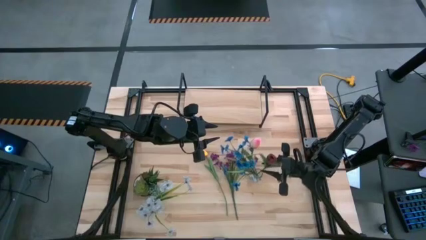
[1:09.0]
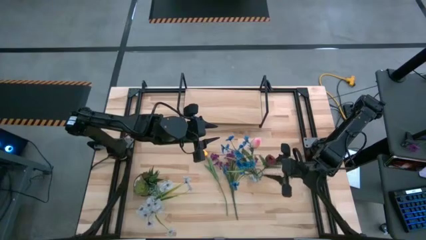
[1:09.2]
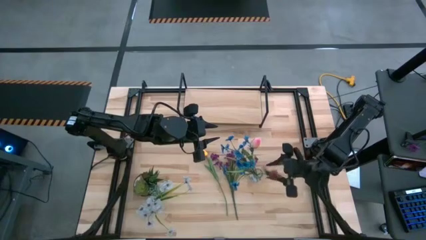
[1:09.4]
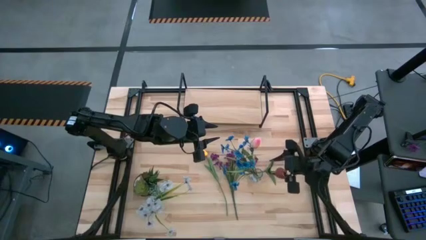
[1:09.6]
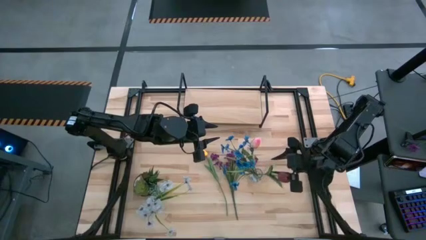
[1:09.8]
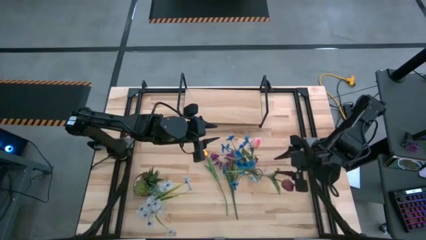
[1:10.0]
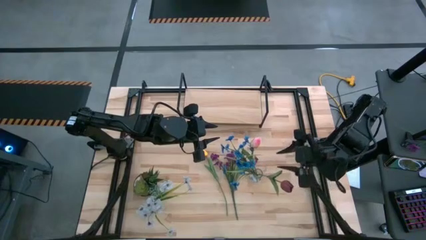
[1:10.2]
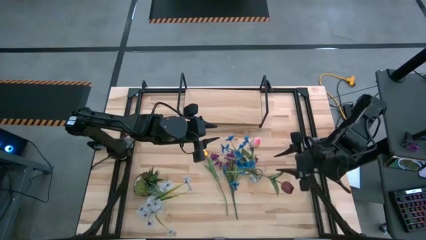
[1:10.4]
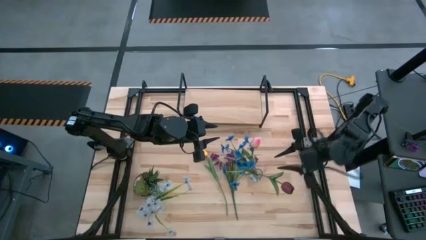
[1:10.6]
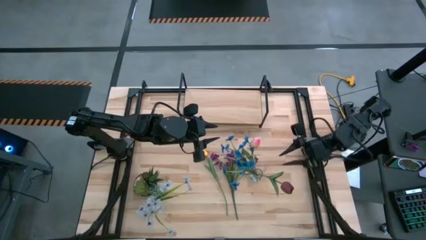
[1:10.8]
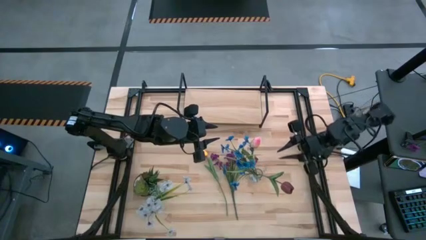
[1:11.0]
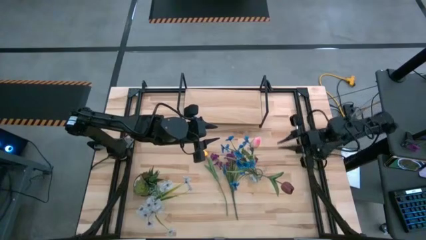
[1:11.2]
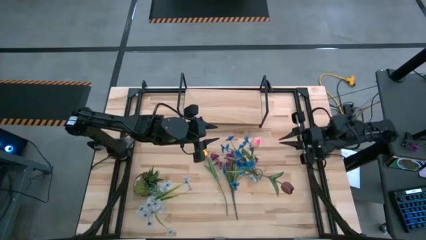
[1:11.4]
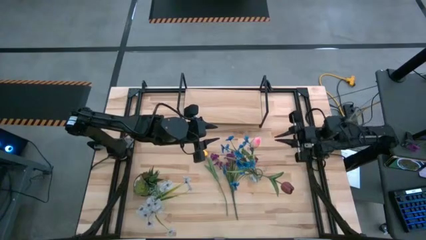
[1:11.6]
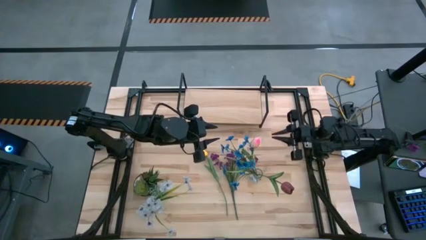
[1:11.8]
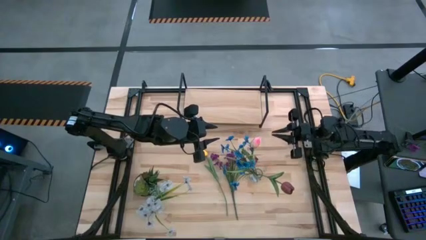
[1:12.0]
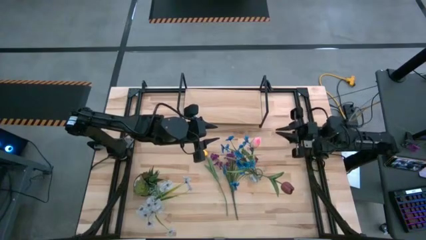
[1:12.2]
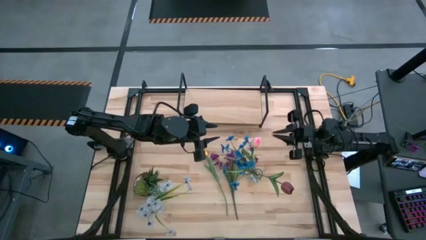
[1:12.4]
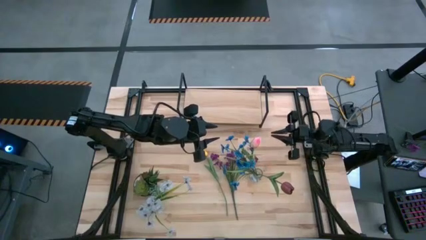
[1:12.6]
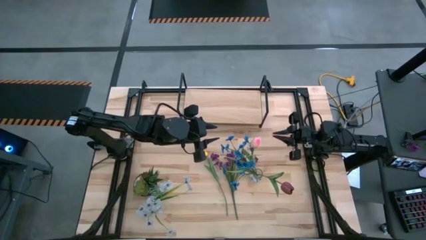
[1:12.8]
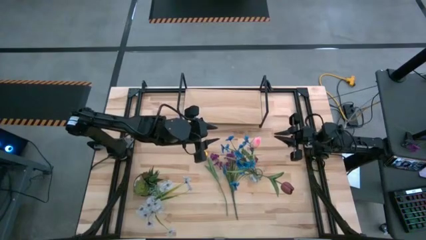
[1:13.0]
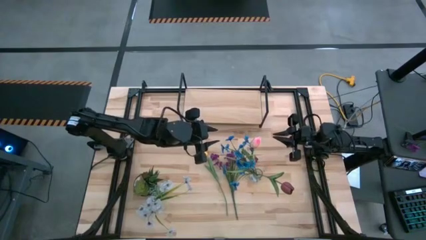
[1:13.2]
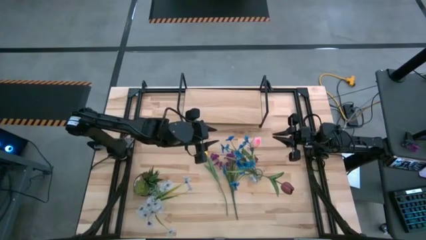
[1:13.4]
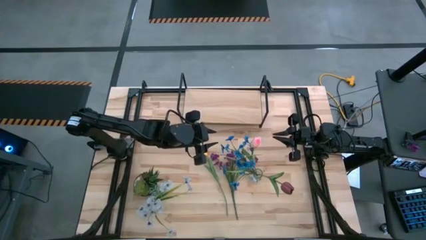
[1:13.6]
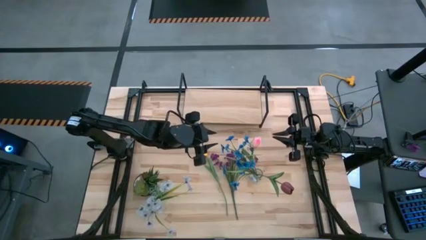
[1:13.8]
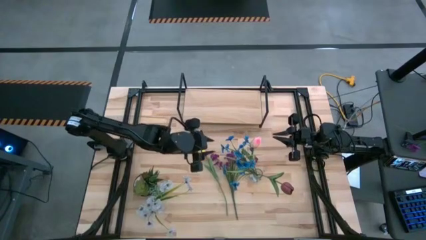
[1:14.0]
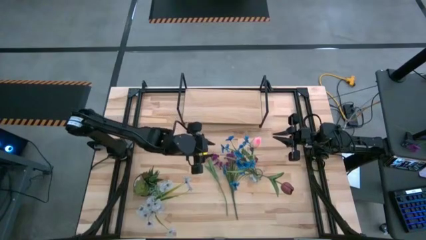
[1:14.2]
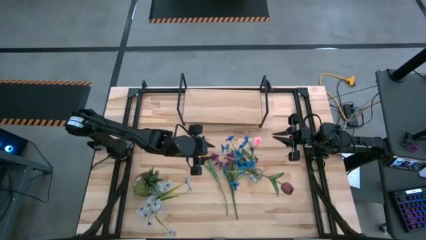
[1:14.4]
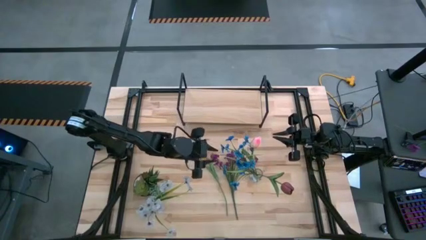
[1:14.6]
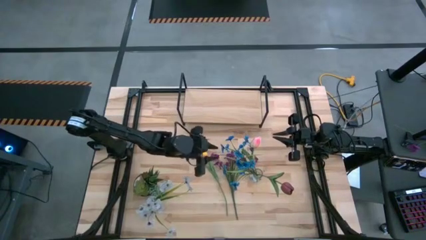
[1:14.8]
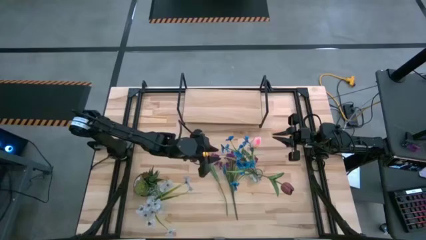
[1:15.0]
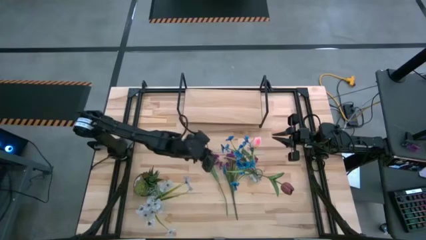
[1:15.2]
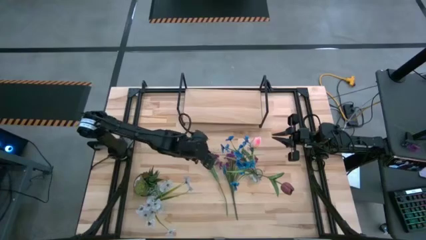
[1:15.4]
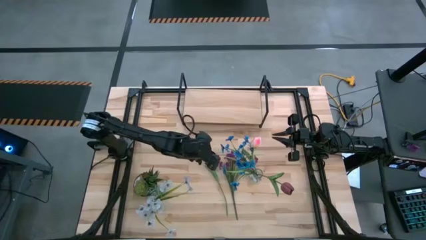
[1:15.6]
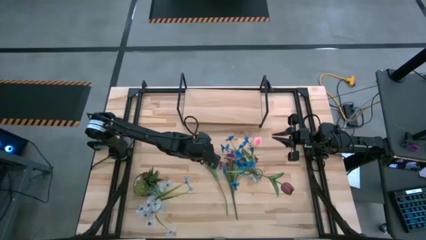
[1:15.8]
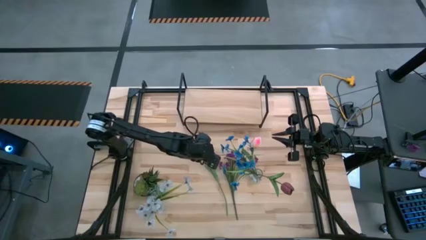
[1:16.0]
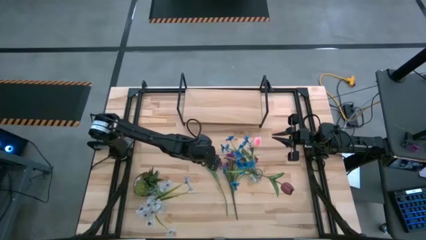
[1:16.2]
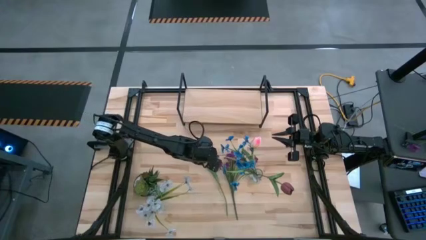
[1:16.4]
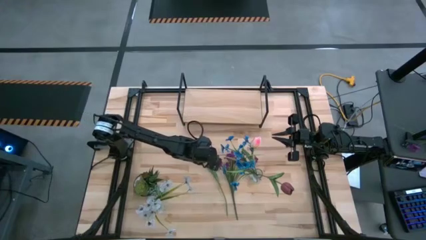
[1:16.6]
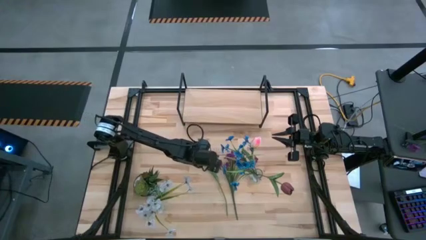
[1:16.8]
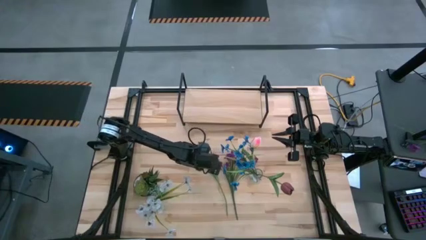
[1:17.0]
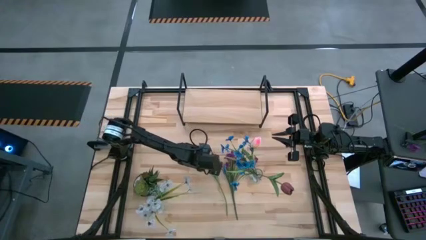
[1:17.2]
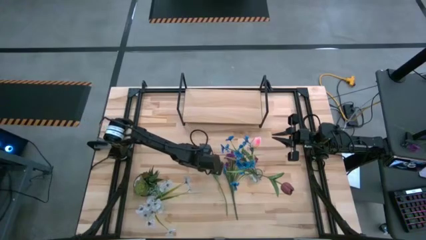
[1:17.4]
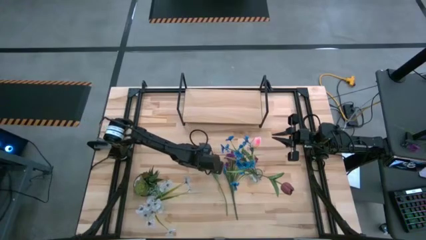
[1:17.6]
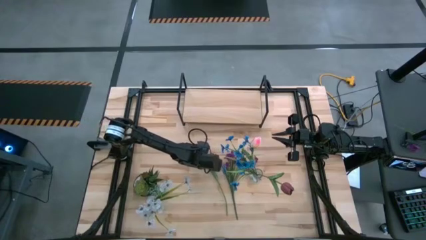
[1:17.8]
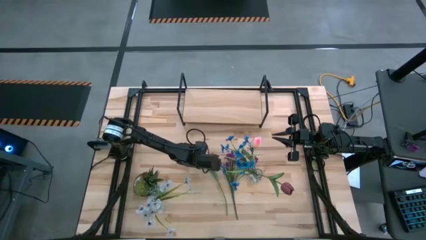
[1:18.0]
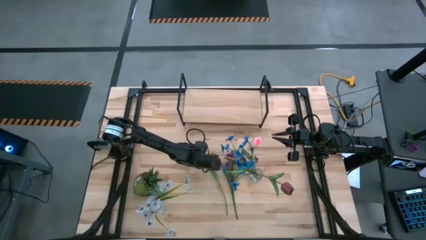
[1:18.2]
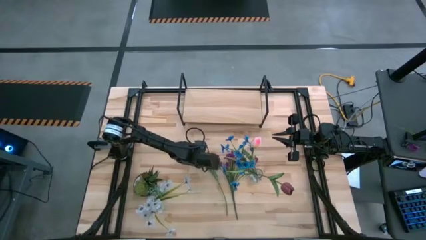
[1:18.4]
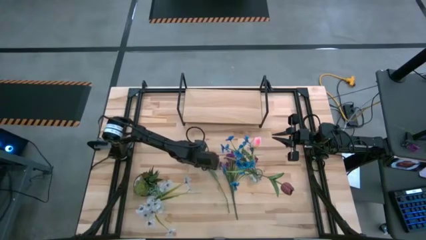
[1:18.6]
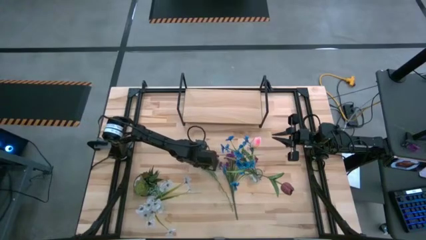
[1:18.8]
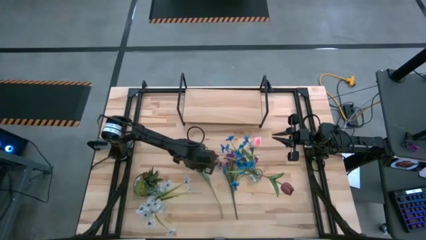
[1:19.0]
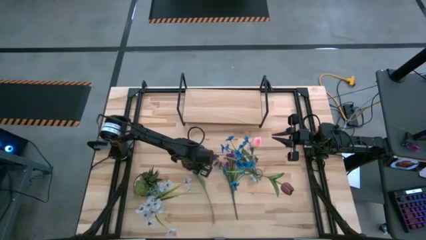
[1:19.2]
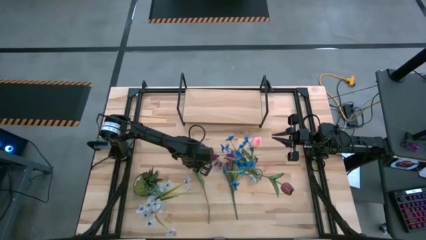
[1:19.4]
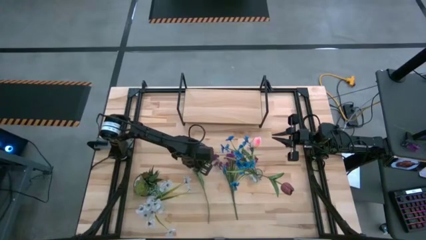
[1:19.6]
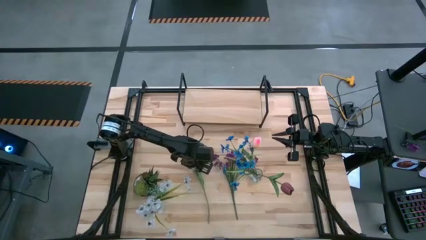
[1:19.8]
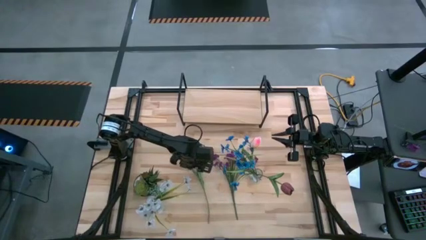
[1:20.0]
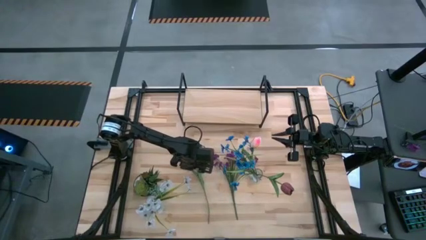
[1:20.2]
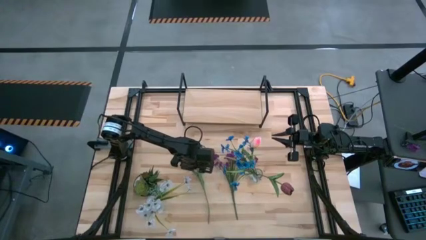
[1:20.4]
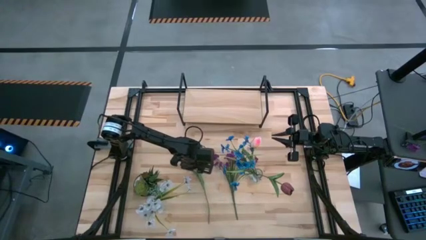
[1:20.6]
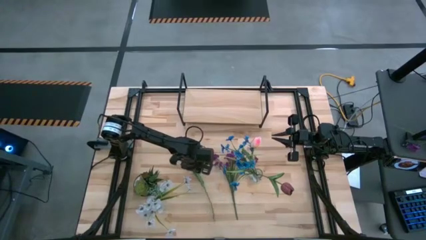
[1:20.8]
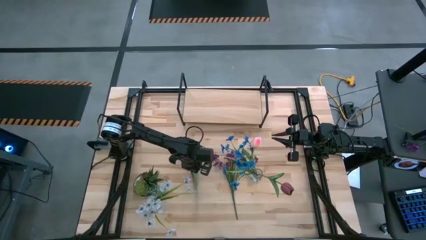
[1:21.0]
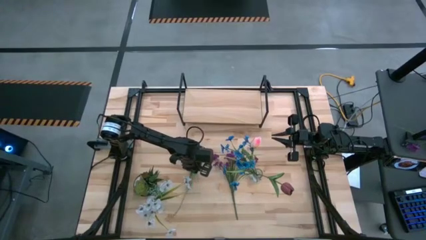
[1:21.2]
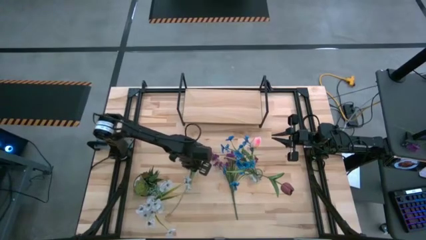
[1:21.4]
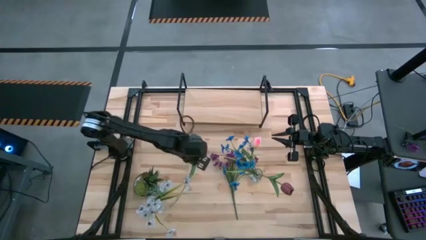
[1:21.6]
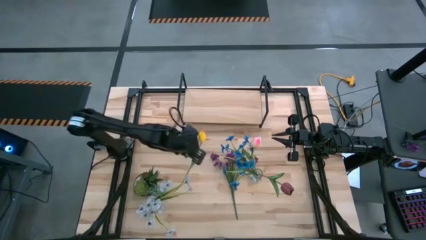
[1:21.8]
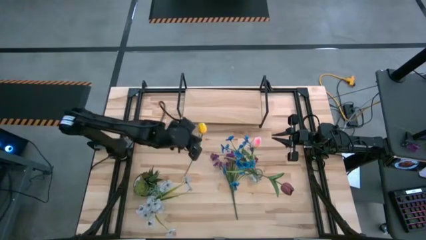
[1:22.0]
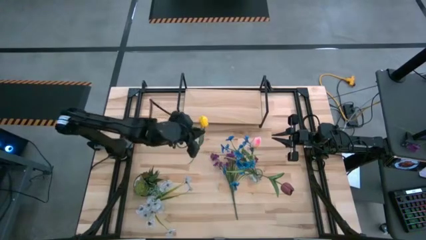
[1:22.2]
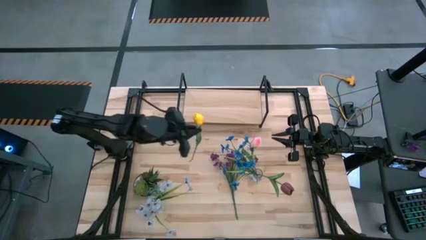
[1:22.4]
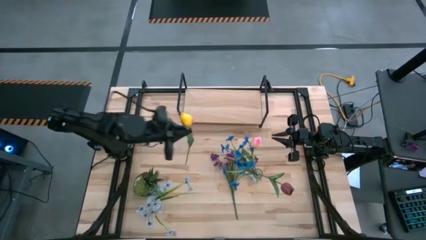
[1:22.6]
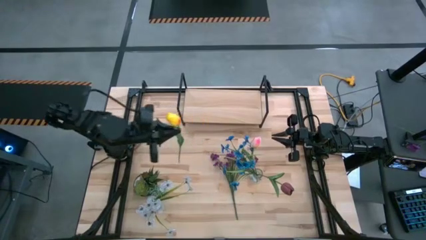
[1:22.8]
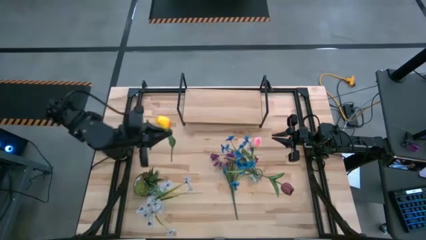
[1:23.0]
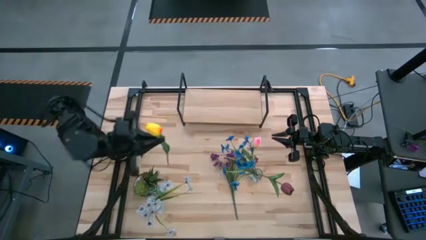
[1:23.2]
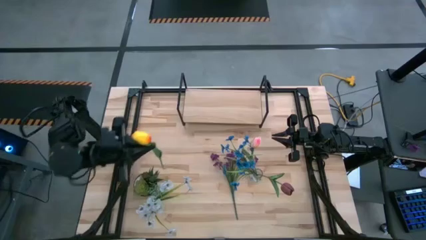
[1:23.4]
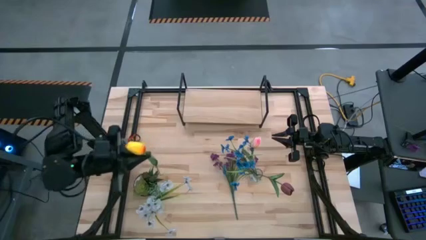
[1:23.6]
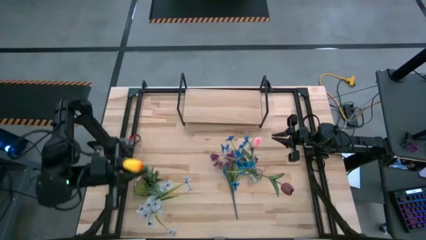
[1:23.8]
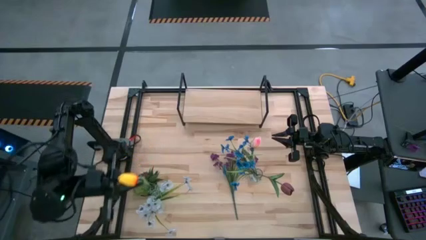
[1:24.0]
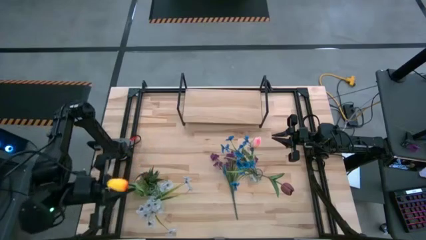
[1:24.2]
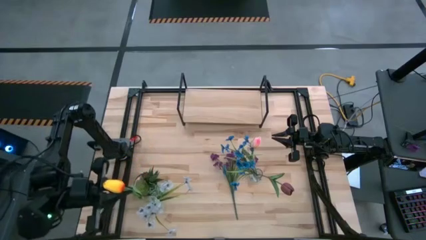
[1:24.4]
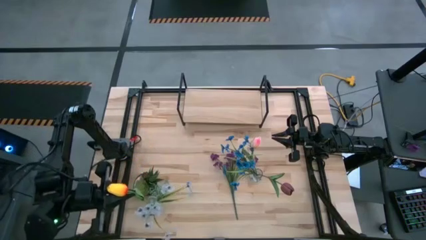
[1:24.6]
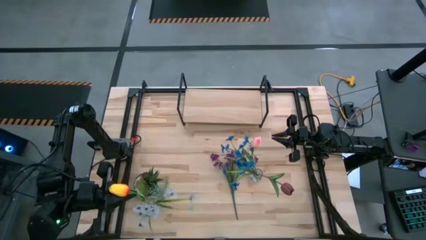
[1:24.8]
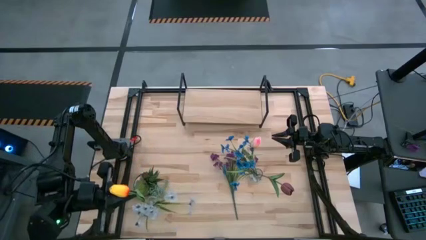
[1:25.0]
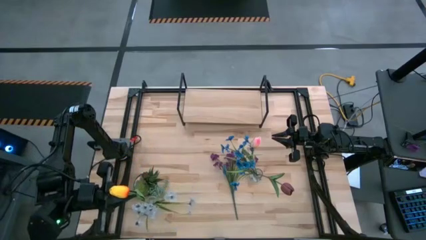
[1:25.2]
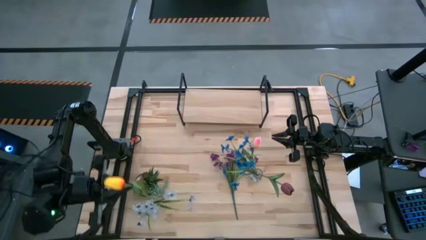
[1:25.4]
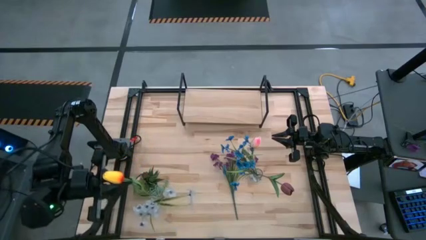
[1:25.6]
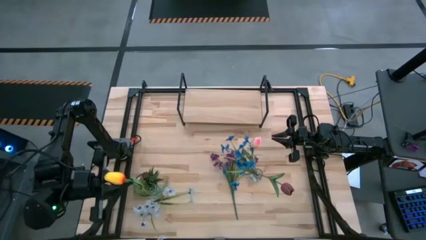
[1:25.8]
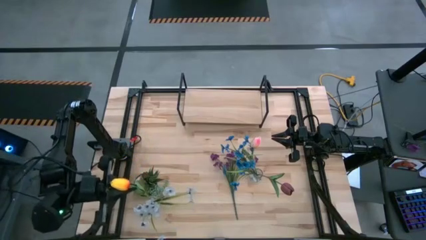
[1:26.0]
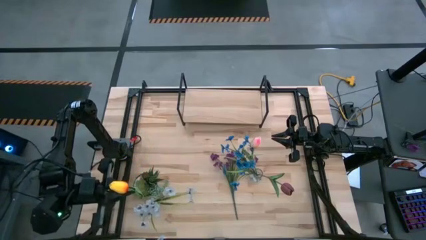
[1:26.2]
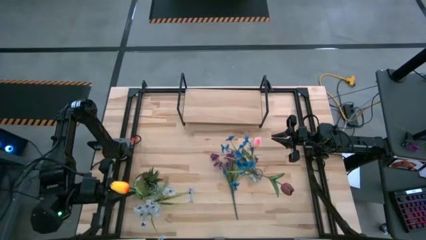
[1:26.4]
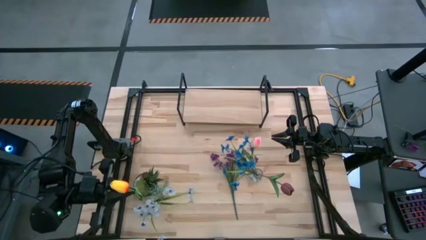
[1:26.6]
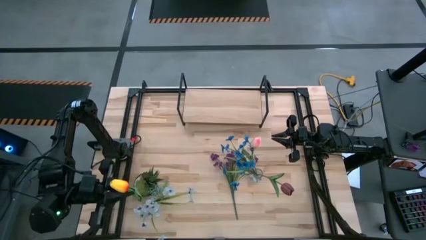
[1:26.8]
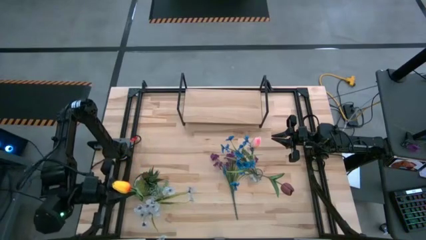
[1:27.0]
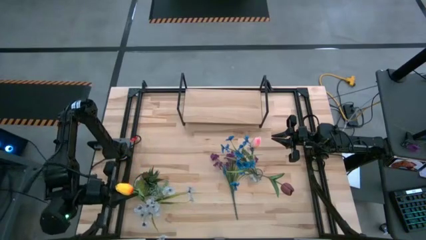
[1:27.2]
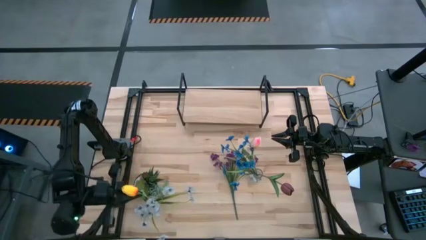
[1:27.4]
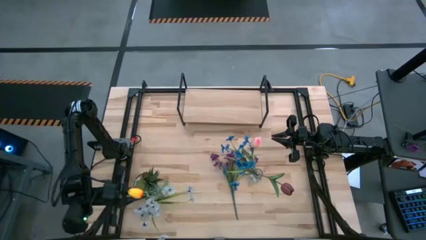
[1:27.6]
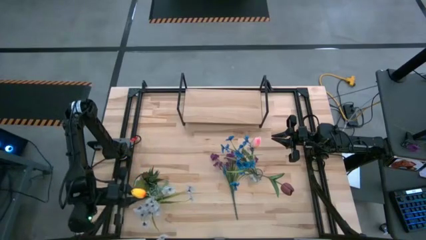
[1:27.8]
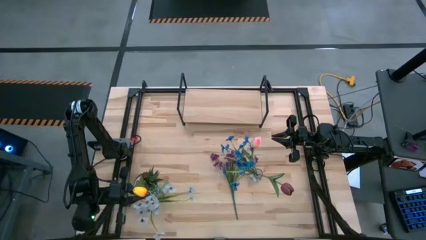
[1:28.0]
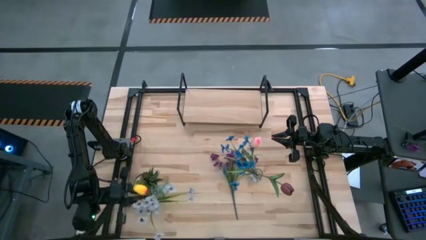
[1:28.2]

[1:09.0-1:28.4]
Task: Pick and place flowers into a vace then onto a shelf
Put the yellow flower into the left transparent vase
